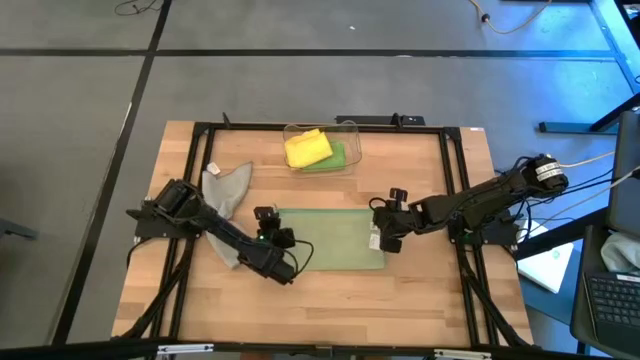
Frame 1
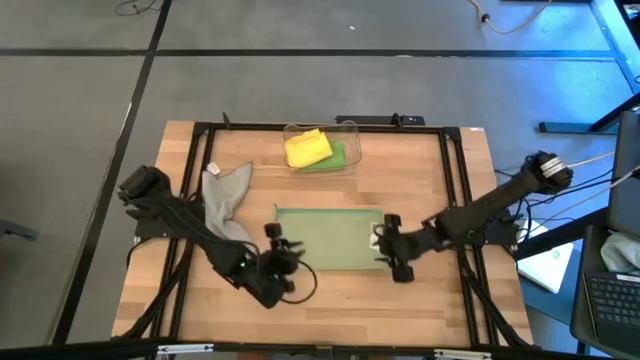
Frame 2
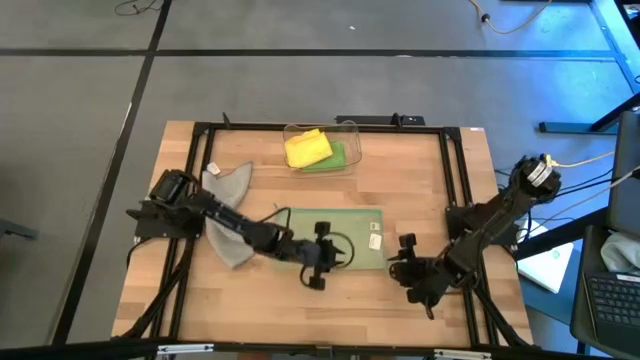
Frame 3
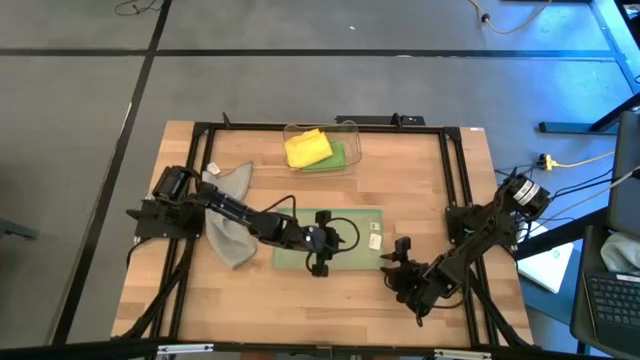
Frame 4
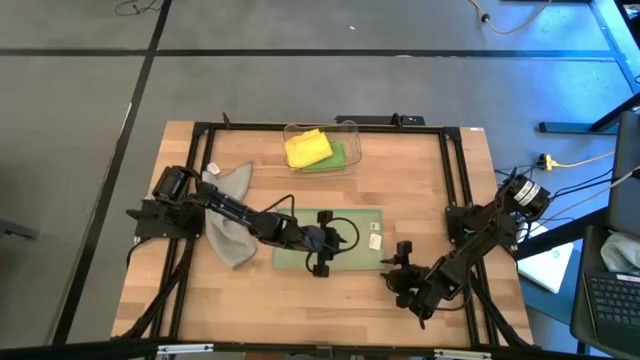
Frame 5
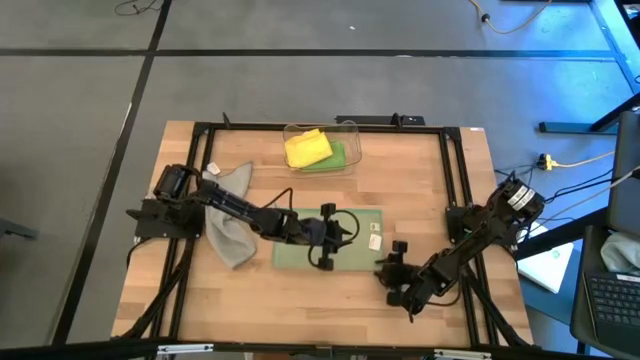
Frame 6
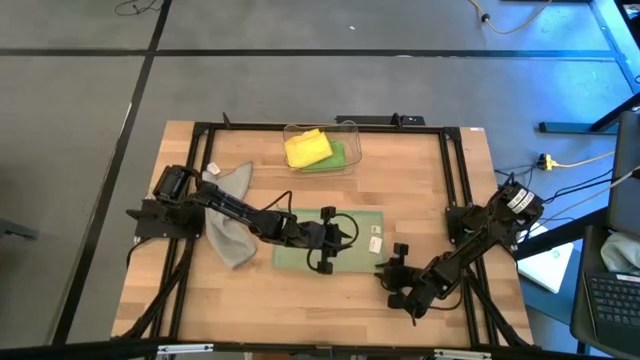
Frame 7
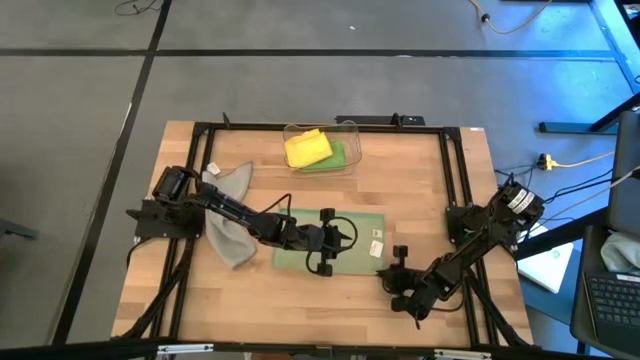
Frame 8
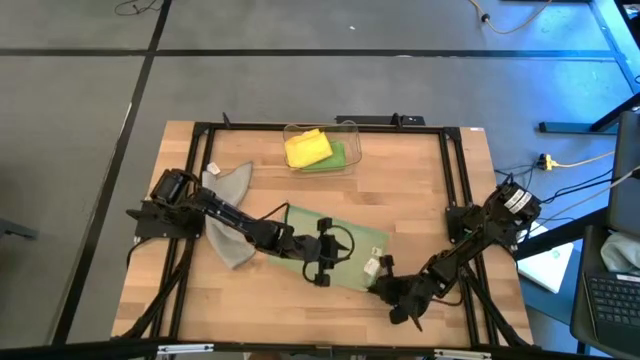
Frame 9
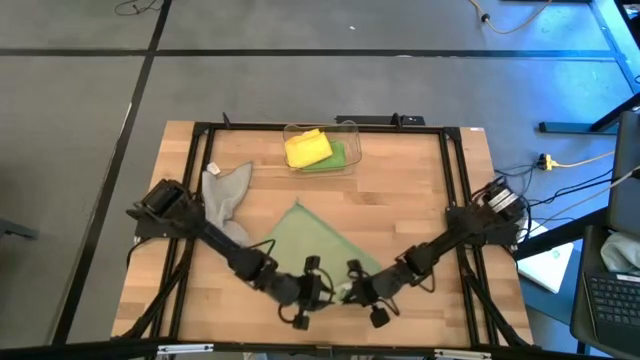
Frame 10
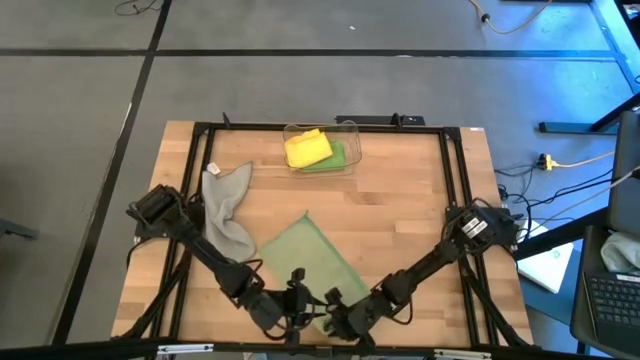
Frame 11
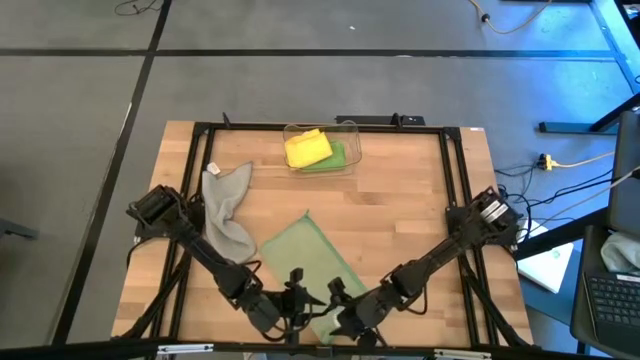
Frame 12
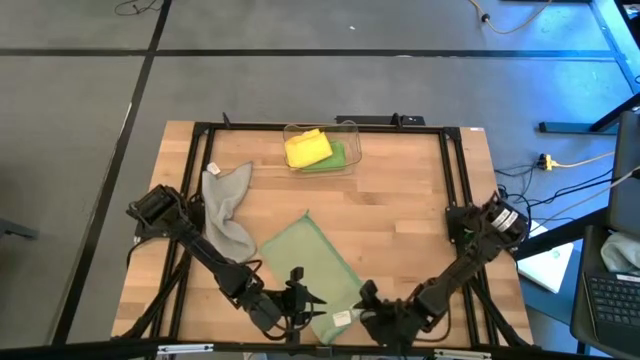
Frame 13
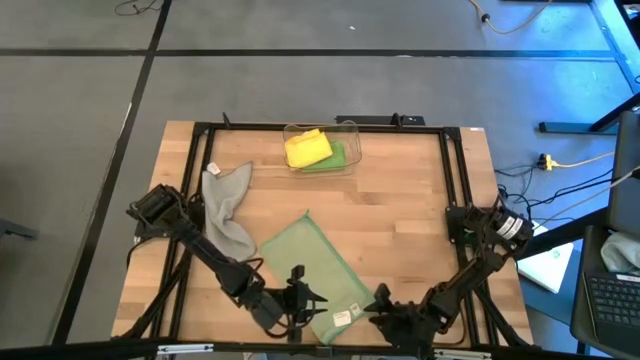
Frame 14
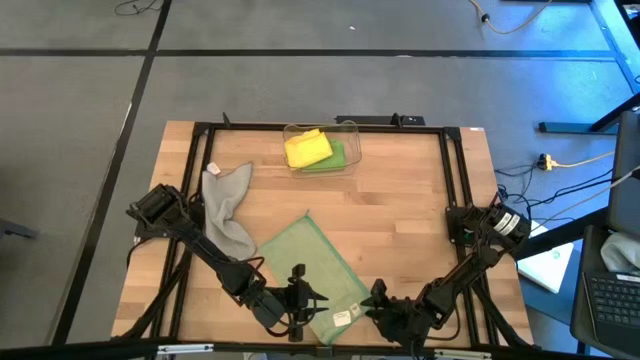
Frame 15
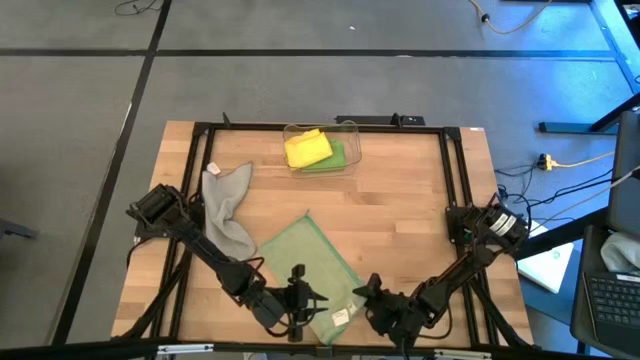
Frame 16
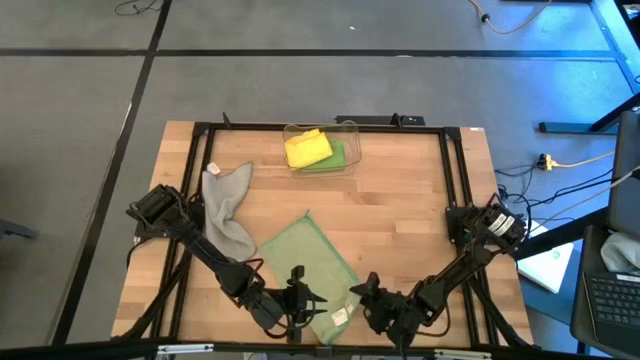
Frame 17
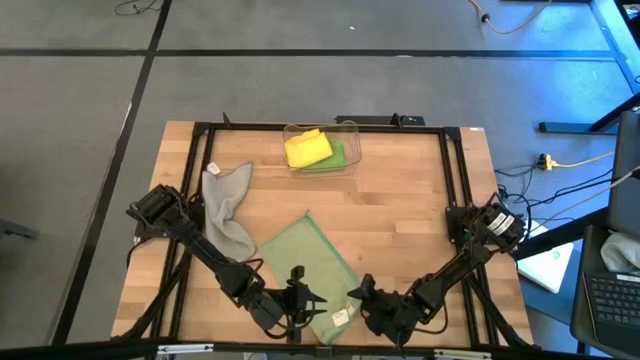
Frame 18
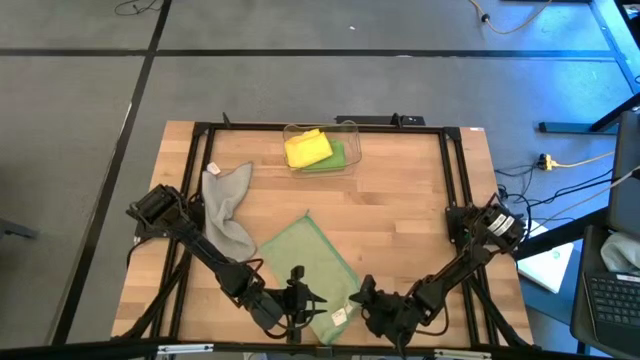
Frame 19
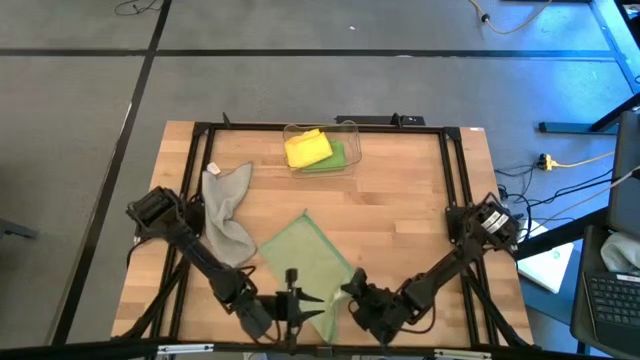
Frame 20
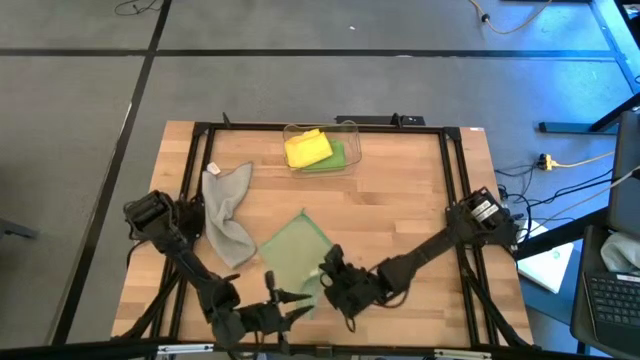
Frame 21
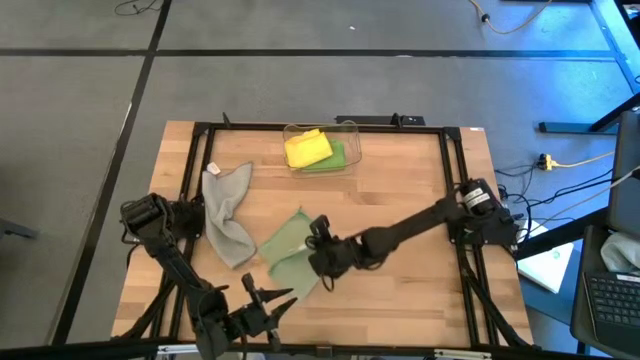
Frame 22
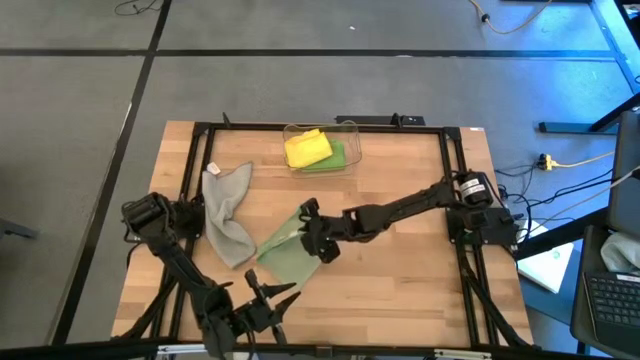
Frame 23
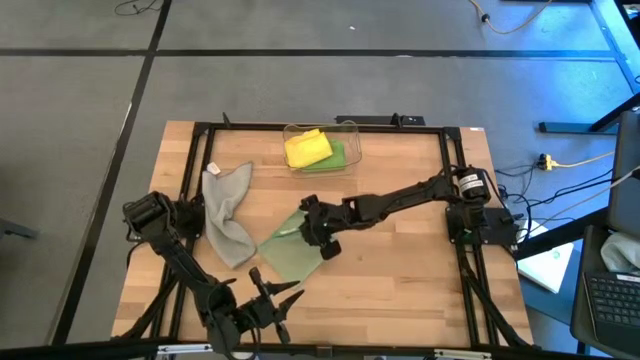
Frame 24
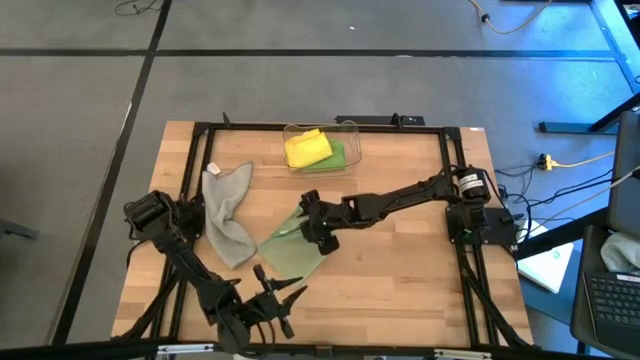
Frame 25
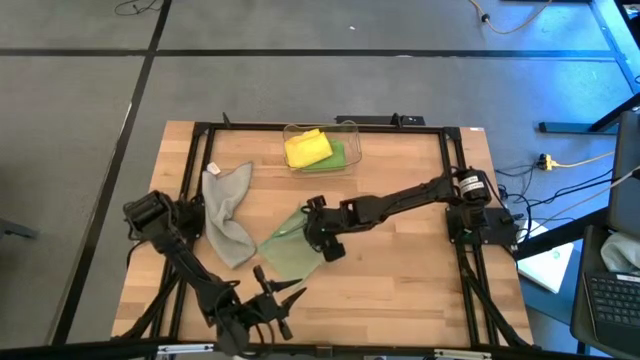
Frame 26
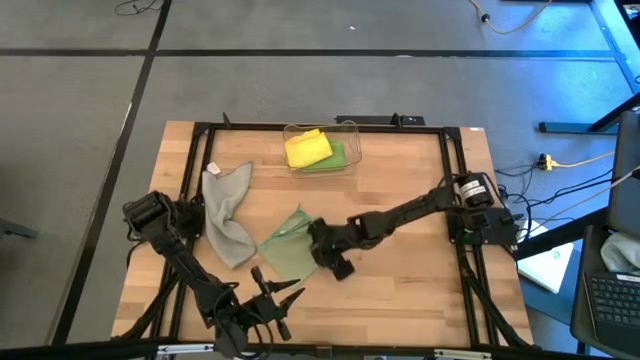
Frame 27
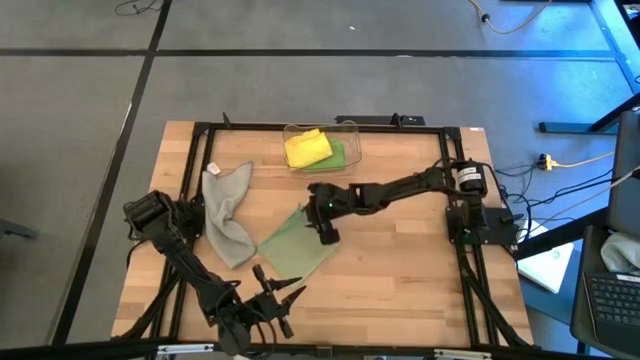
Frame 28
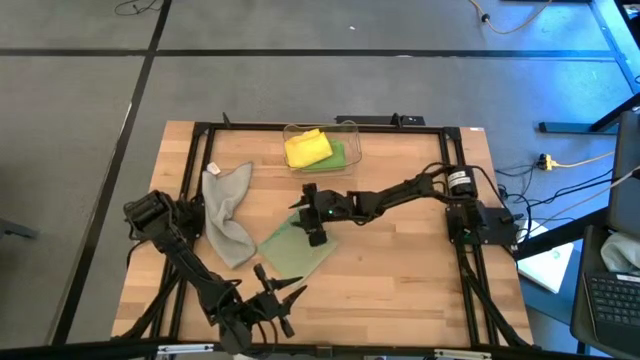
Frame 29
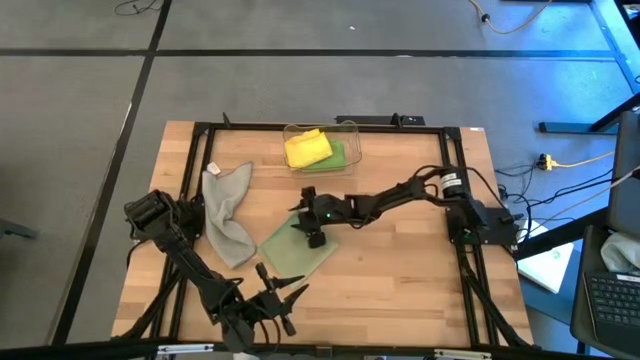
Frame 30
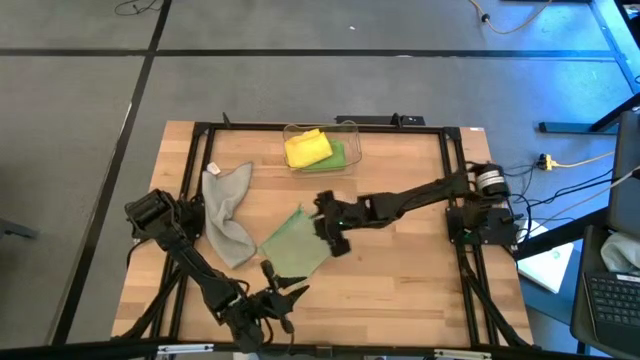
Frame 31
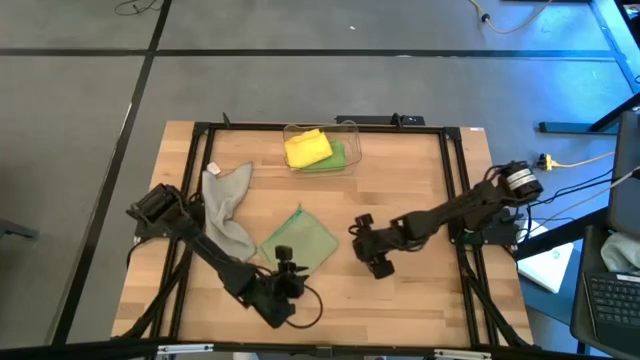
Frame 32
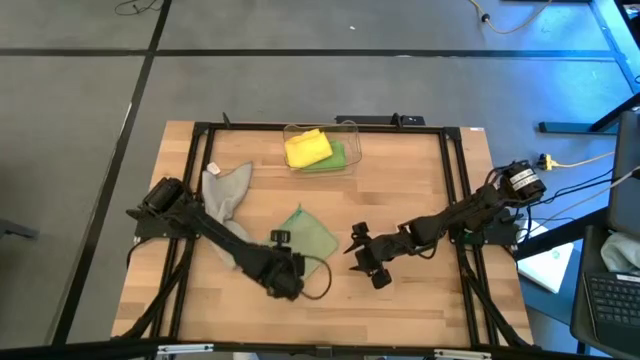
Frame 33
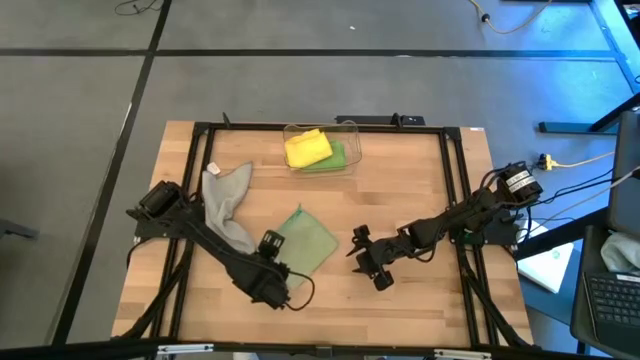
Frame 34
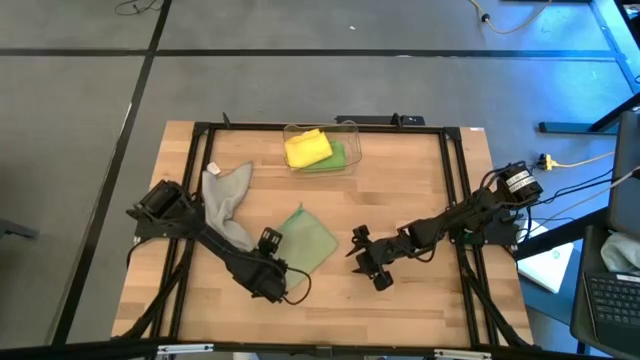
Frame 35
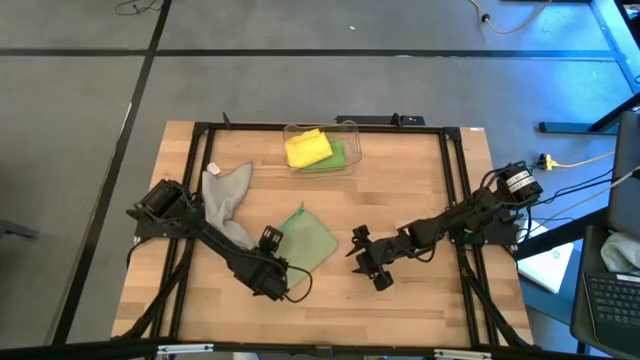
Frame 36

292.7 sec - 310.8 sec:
Task: Fold microfiber towels
Fold the light green microfiber cloth

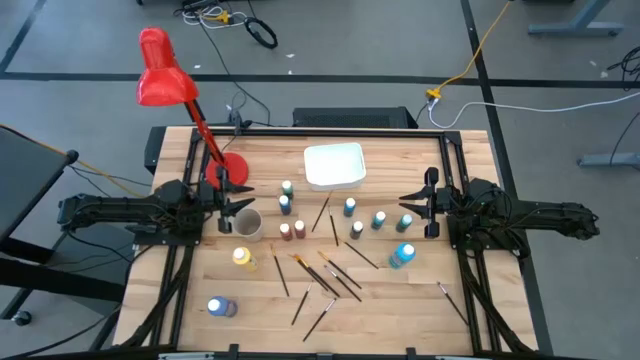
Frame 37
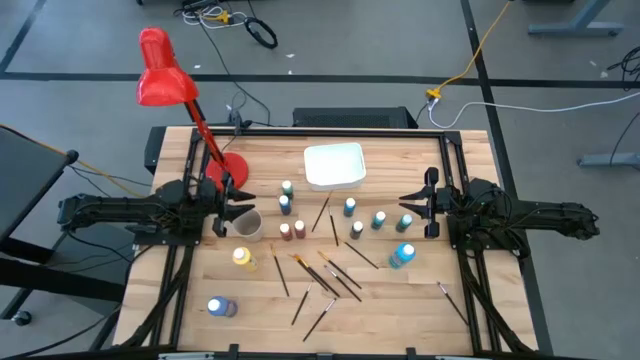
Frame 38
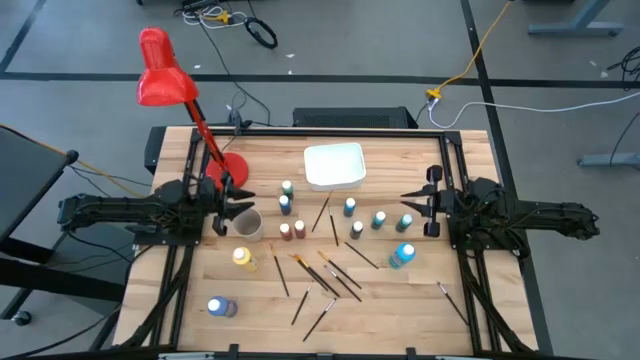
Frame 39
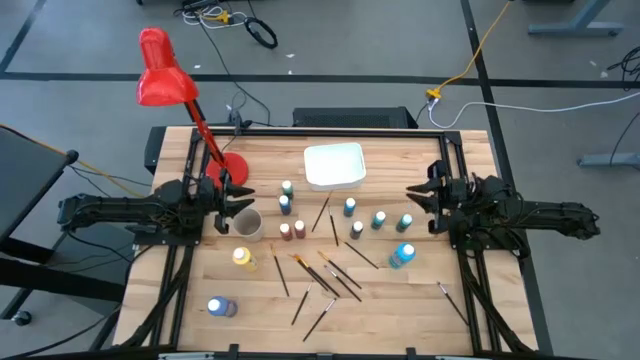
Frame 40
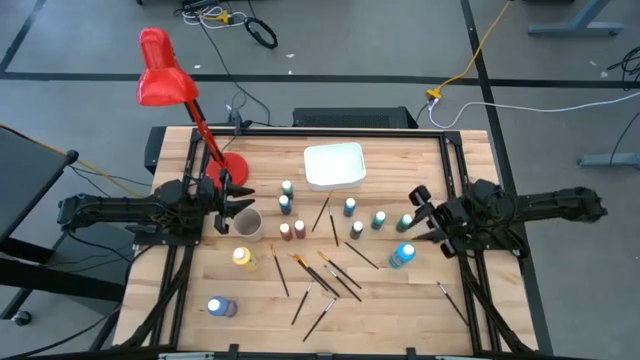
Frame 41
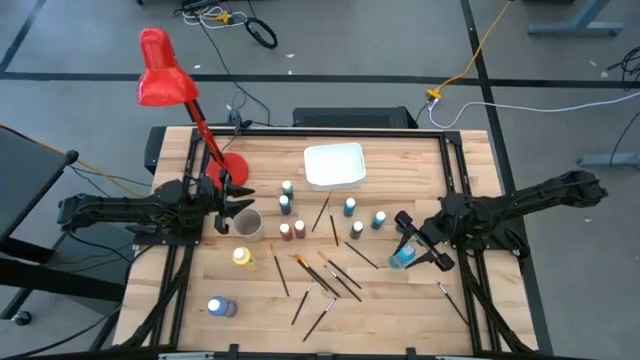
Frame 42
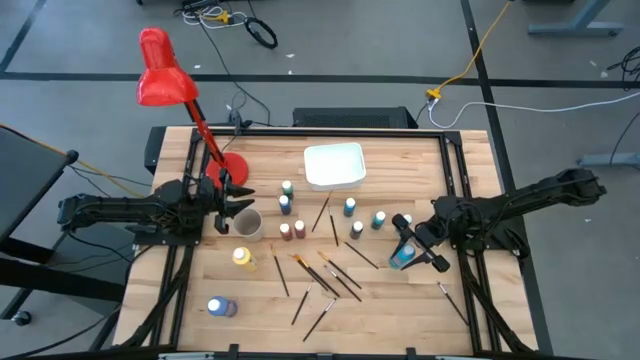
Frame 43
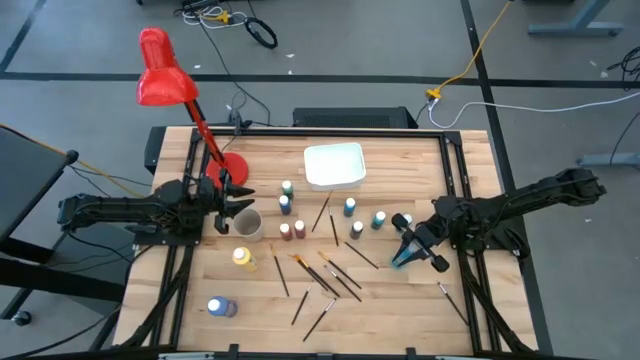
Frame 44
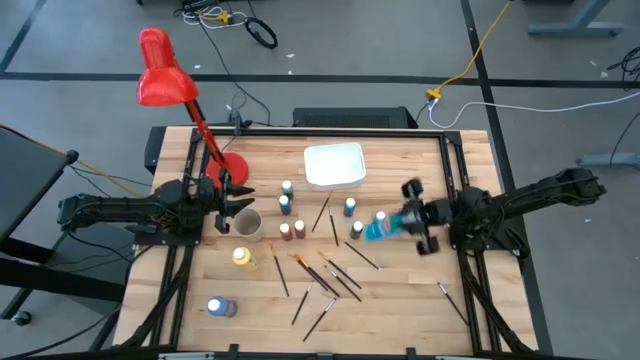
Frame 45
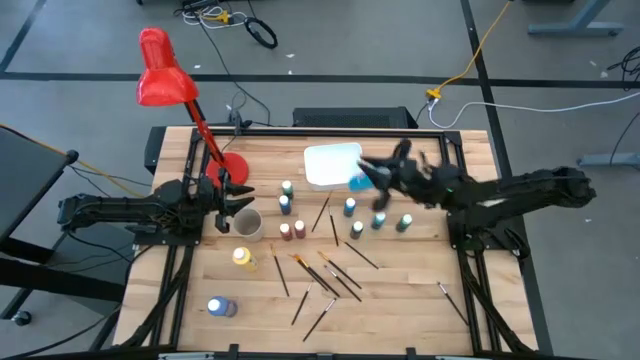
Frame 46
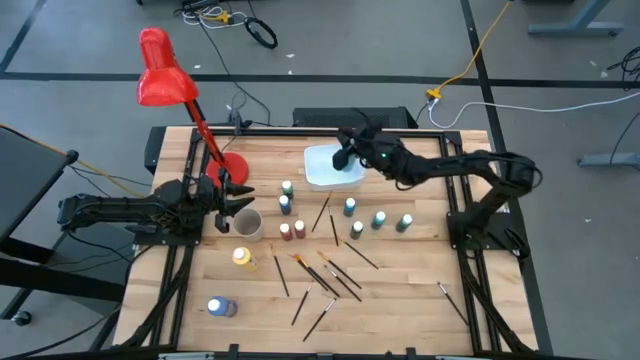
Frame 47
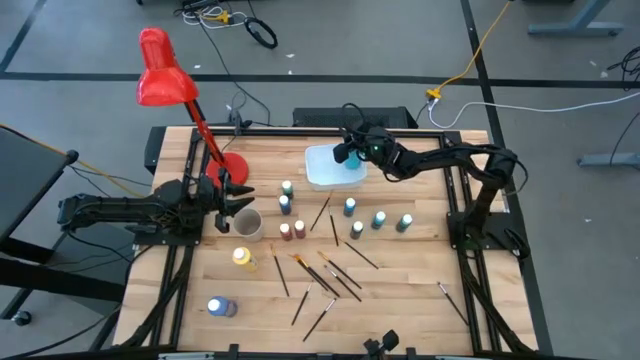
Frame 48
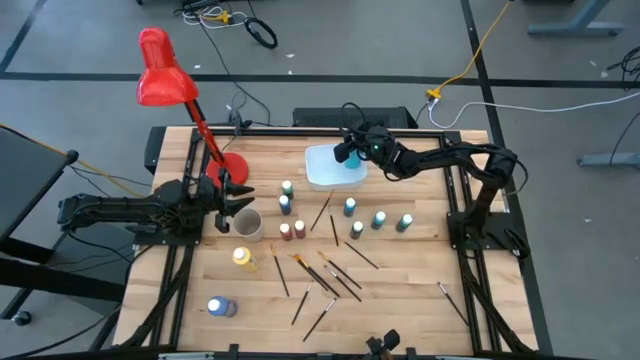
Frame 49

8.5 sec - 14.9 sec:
Task: Pick & Place Paint Supplies
Put the large light blue paint bottle into the white bin
